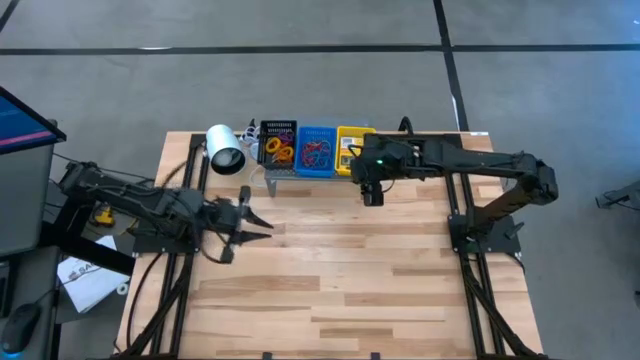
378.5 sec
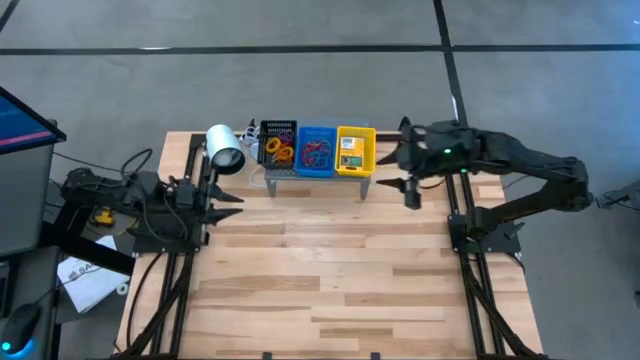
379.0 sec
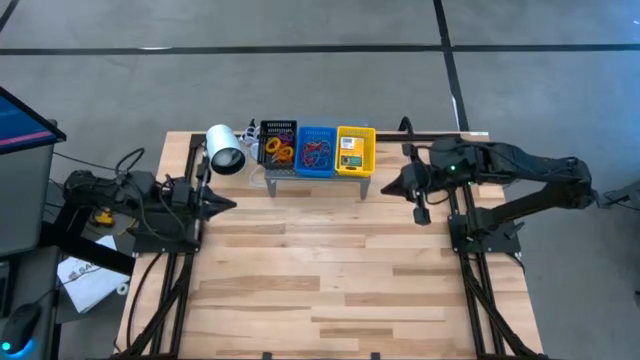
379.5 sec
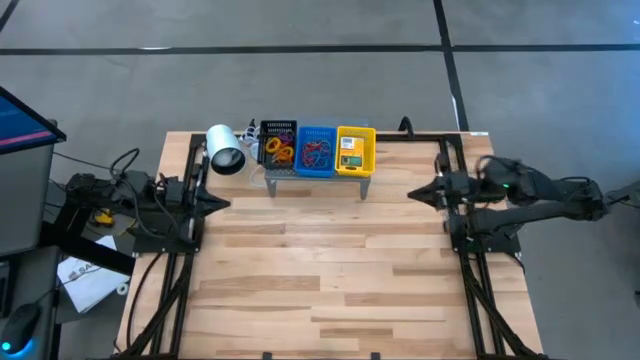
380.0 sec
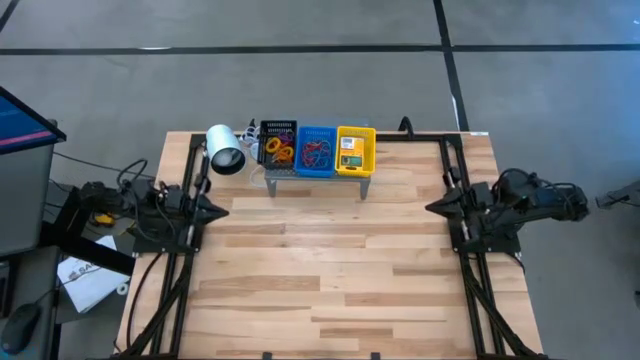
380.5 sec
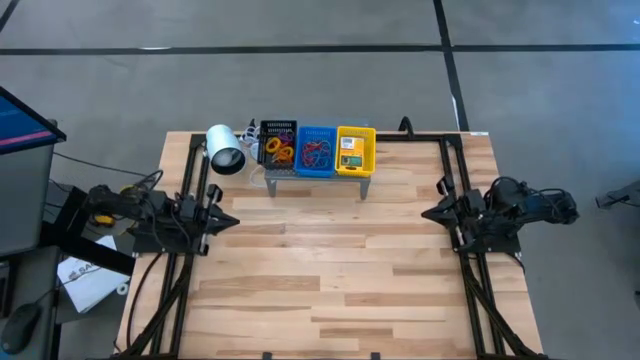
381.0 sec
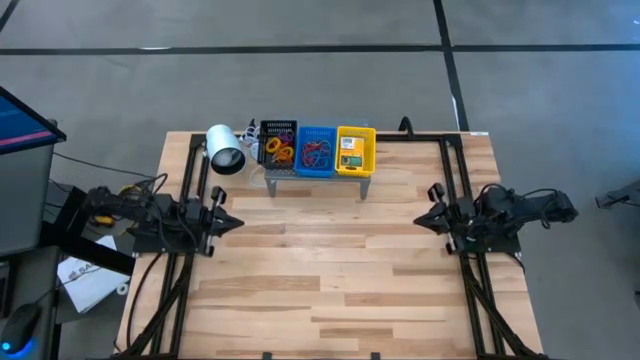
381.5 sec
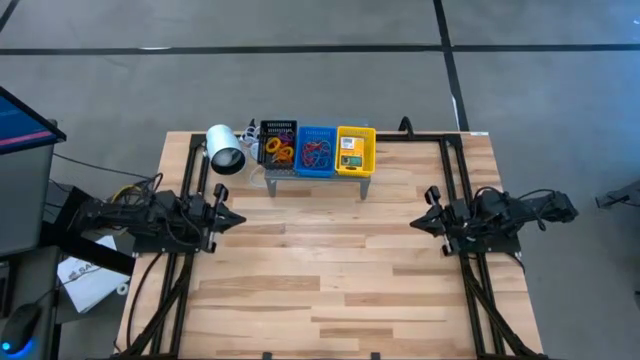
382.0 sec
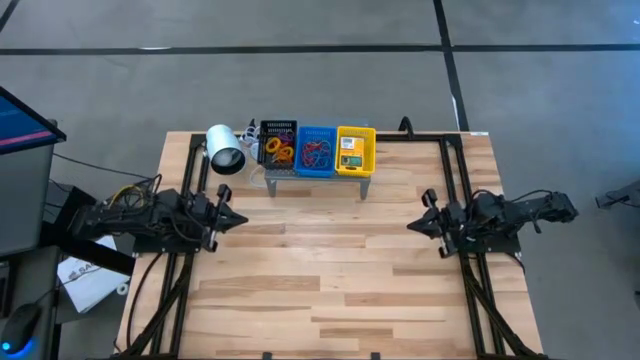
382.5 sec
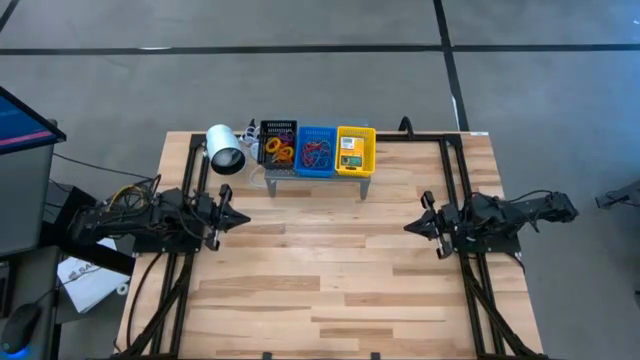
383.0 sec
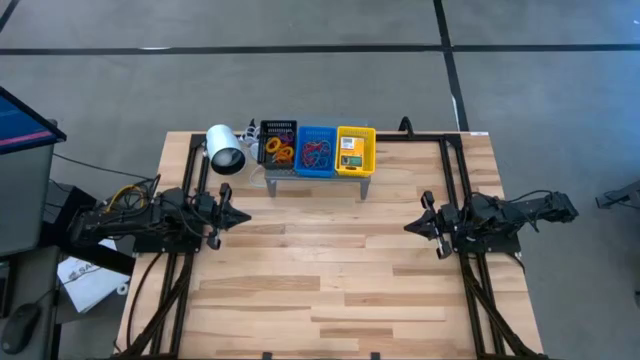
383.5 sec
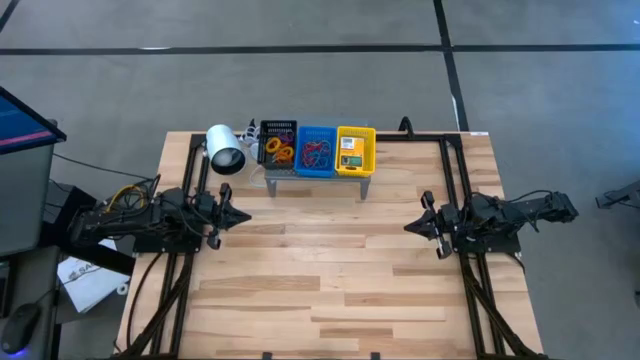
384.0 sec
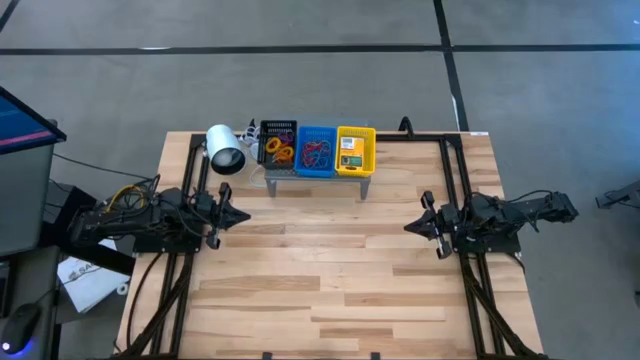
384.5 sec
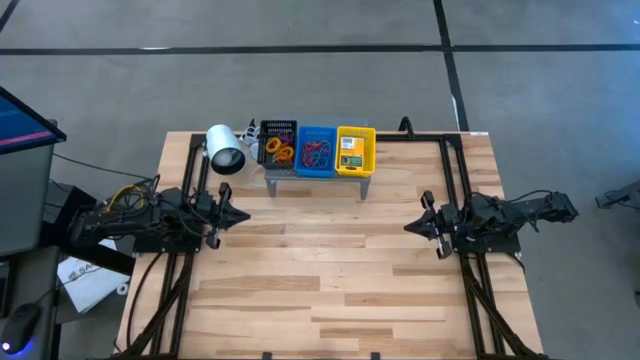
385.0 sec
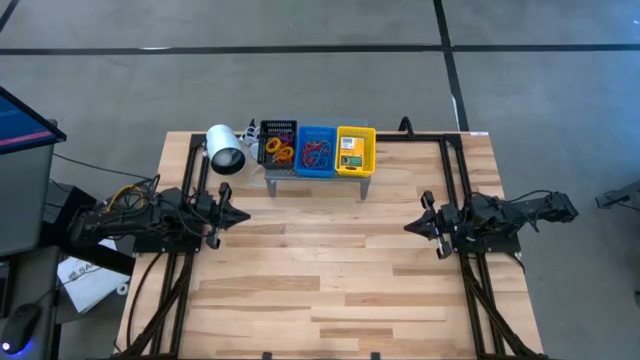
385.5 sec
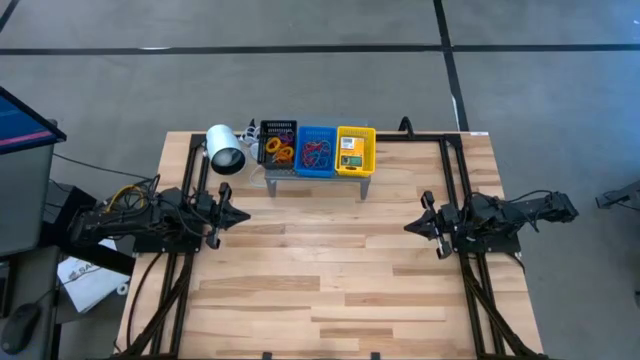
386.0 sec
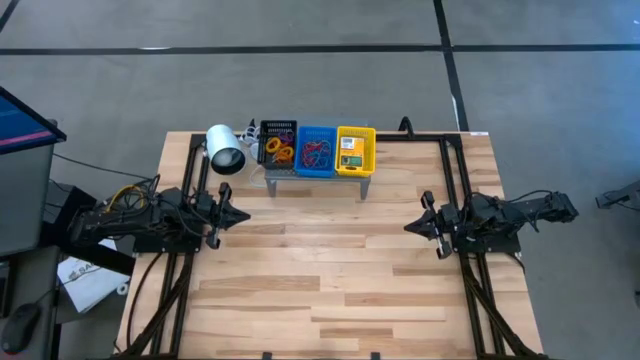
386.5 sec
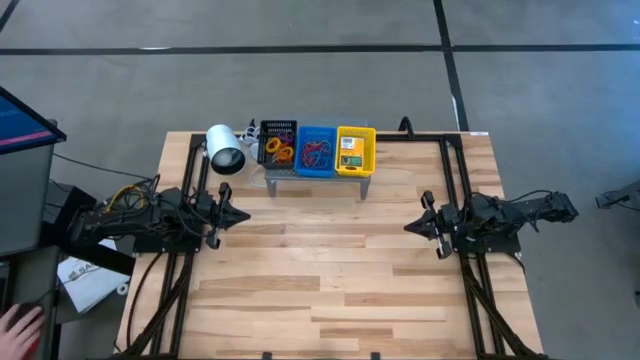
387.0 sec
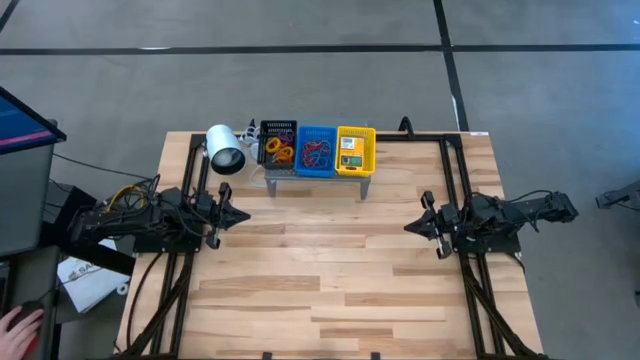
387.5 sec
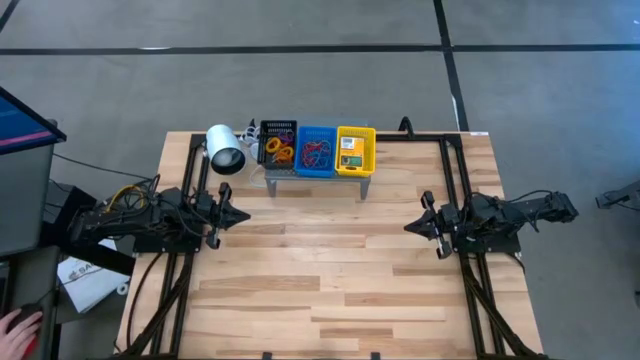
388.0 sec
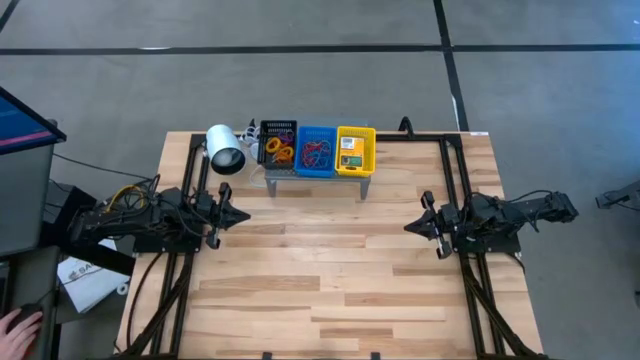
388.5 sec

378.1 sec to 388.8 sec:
Task: Pick & Place Office Desk Supplies
Return to Home Position

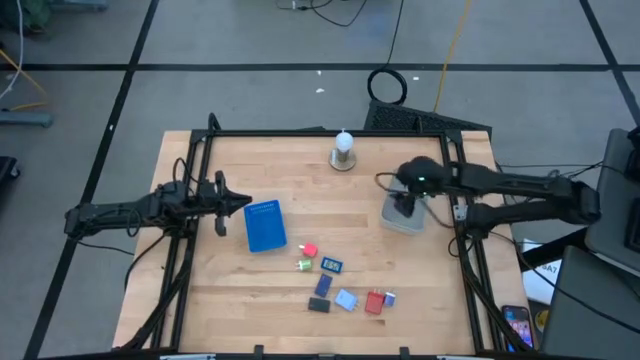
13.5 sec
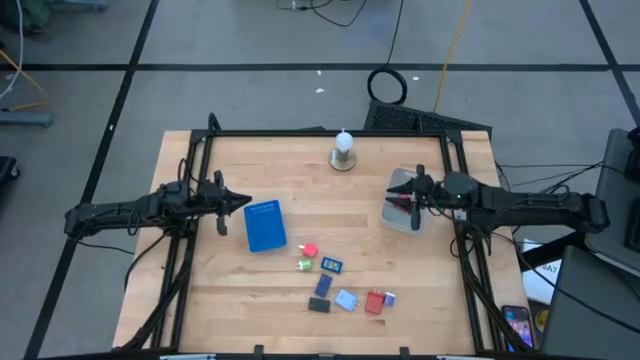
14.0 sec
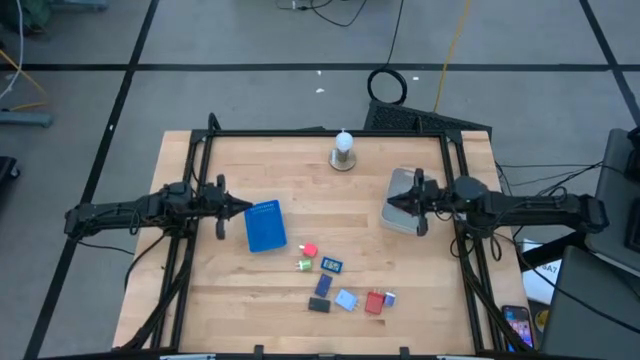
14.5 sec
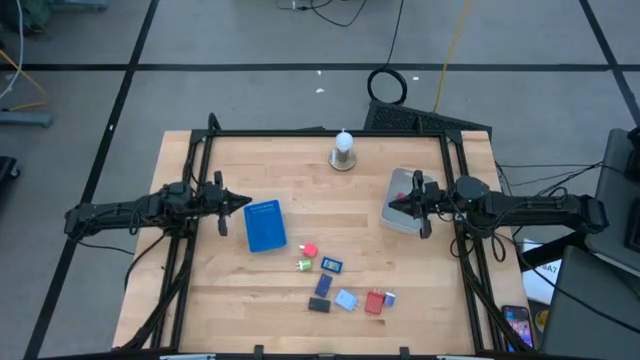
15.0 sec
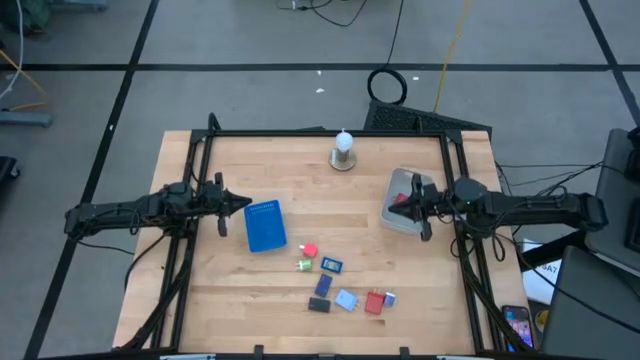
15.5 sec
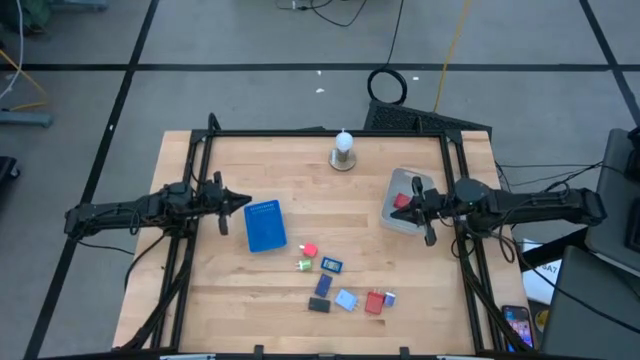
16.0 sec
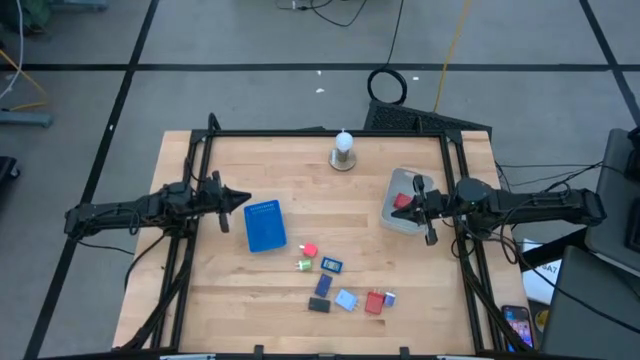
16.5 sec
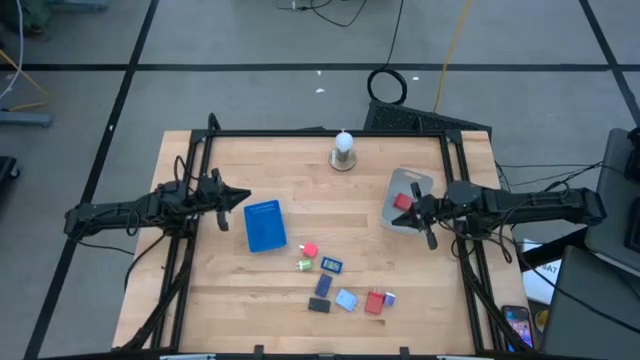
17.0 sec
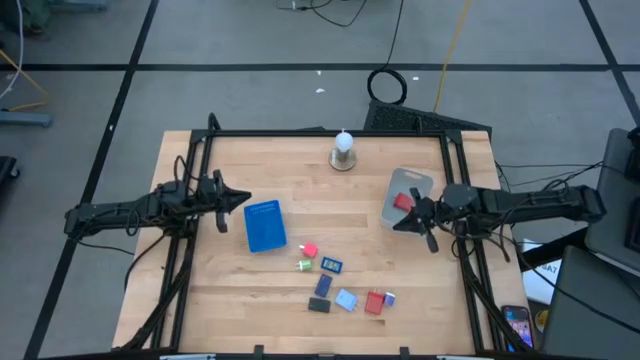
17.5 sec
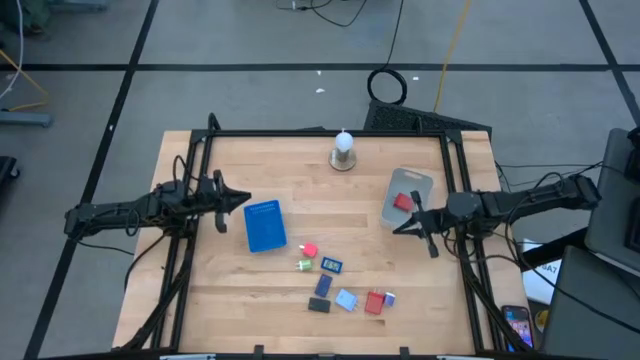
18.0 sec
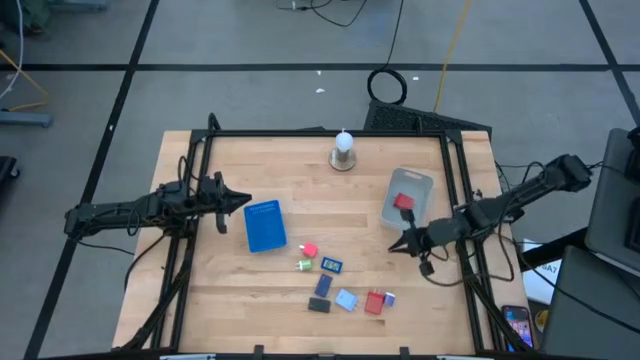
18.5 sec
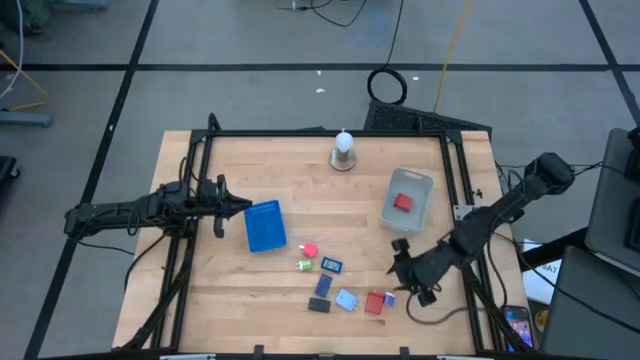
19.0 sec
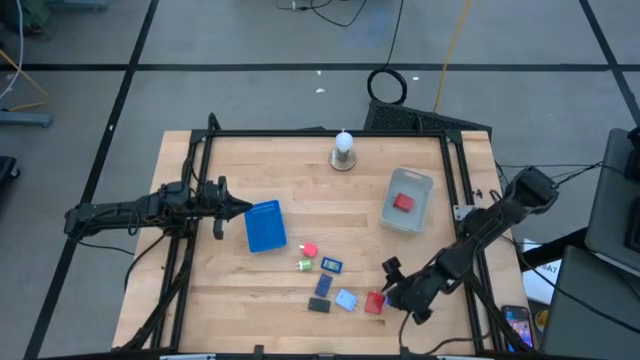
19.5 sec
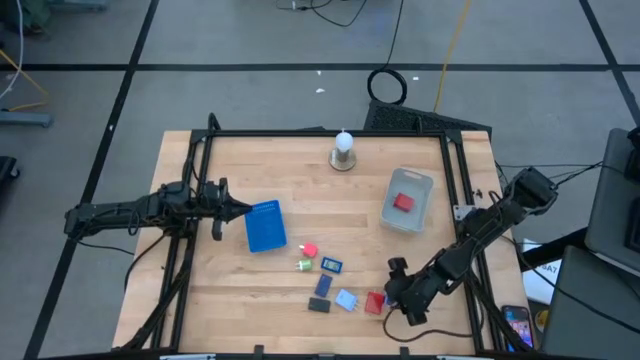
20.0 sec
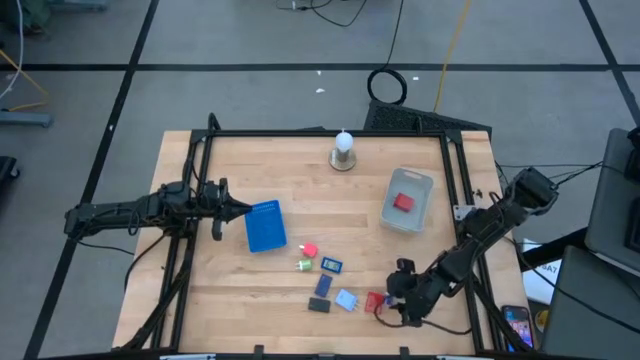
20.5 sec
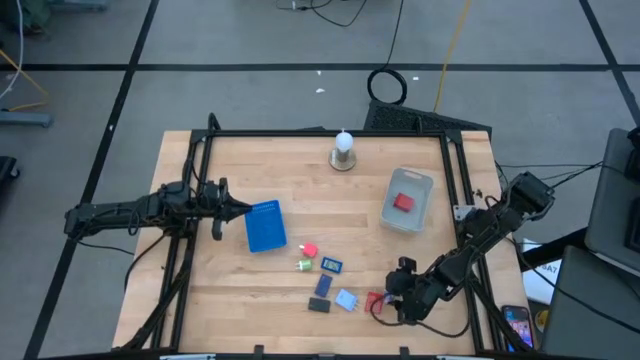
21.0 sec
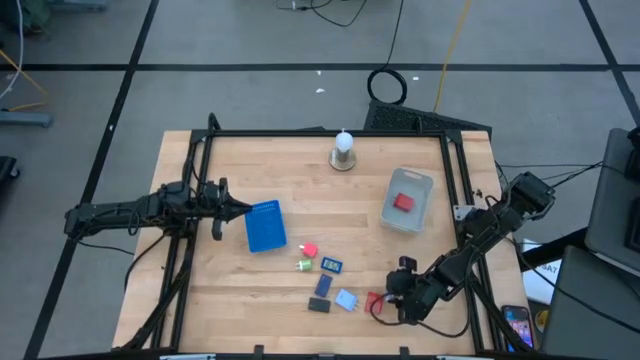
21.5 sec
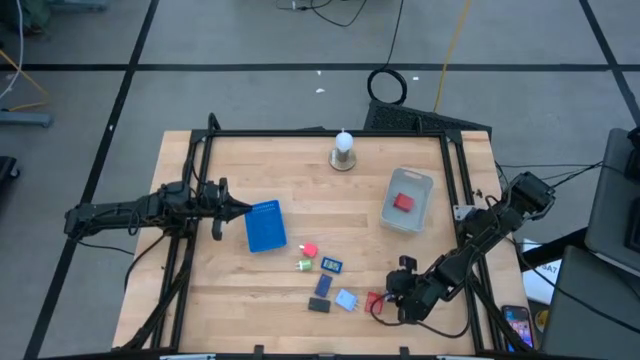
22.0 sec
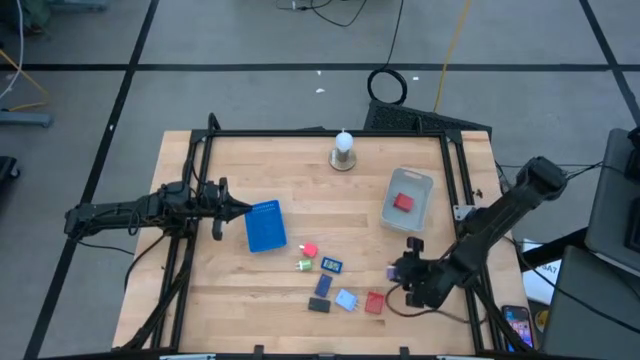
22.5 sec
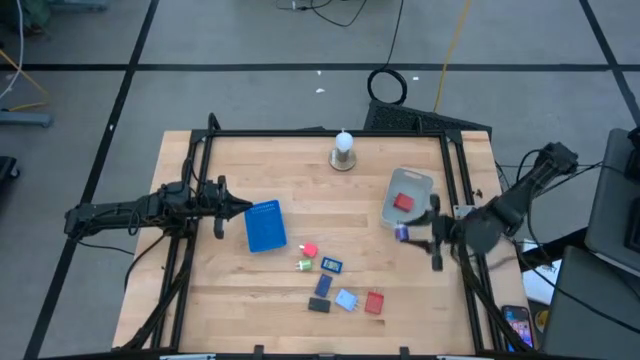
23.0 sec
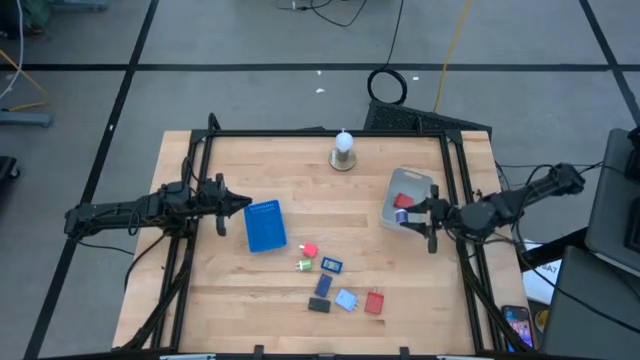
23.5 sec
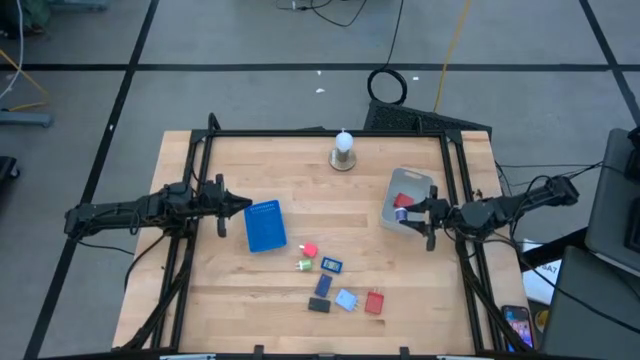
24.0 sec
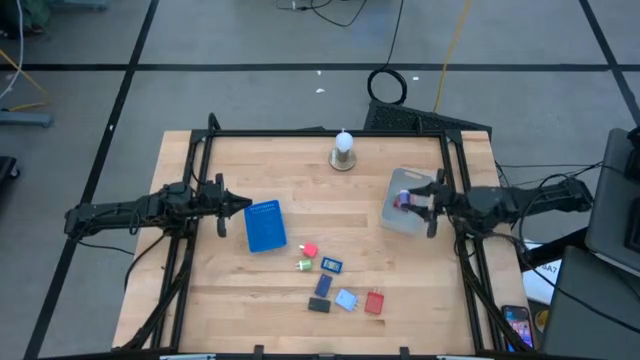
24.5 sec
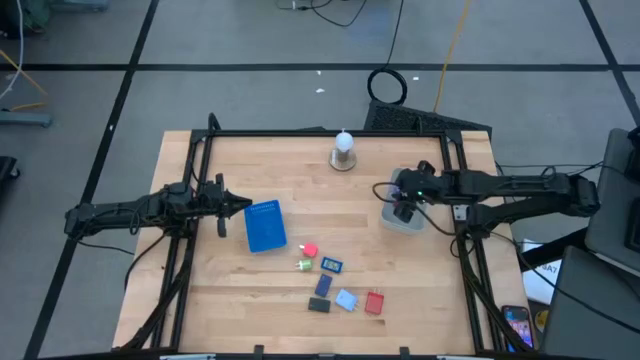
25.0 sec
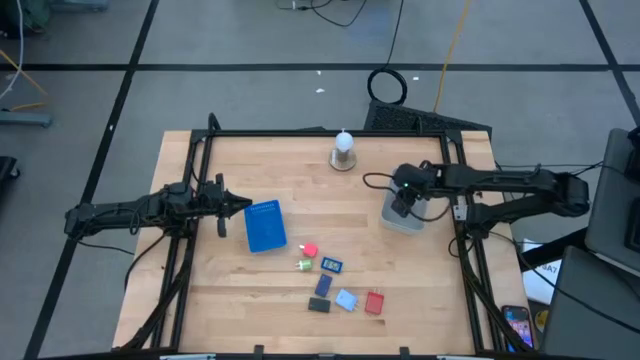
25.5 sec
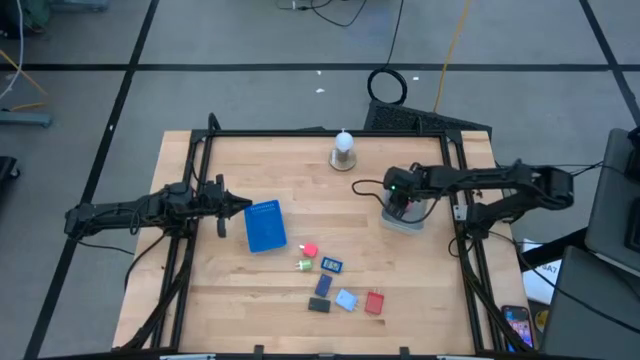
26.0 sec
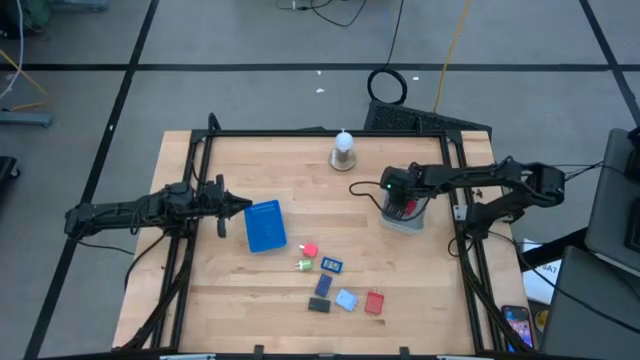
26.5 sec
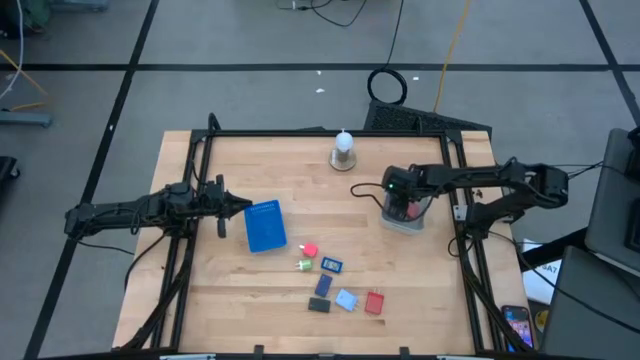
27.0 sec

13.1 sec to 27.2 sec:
Task: Pick & Place Office items
Put the purple charger adapter into the gray bin
